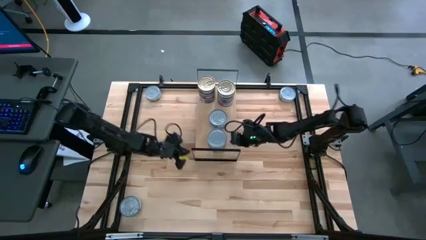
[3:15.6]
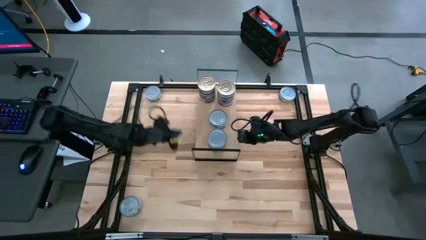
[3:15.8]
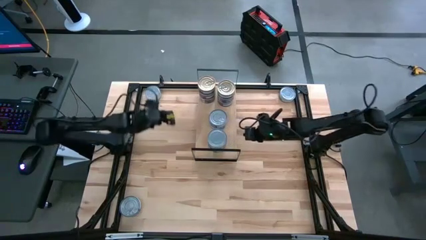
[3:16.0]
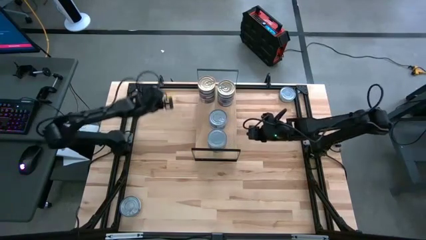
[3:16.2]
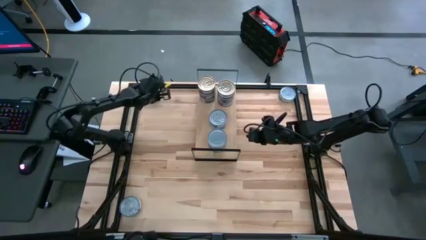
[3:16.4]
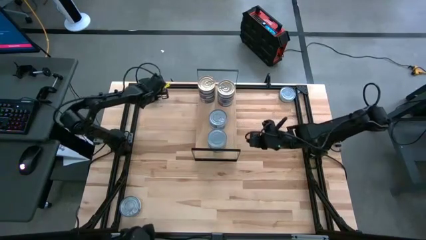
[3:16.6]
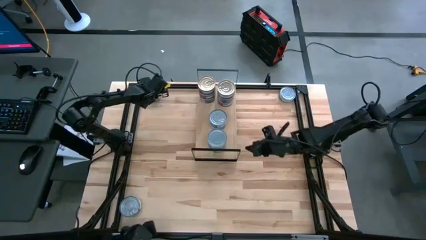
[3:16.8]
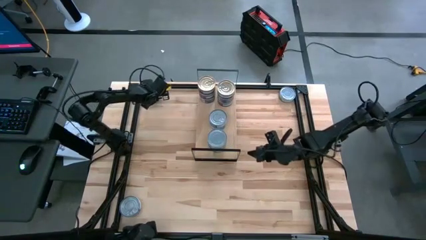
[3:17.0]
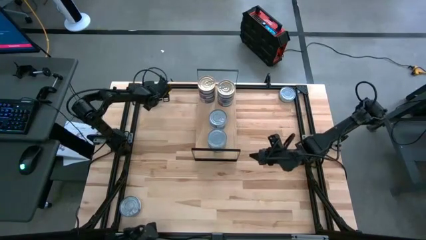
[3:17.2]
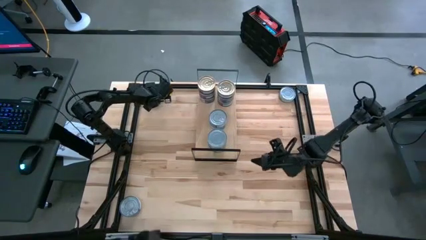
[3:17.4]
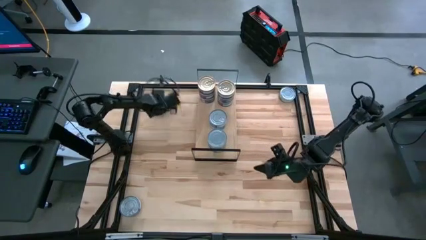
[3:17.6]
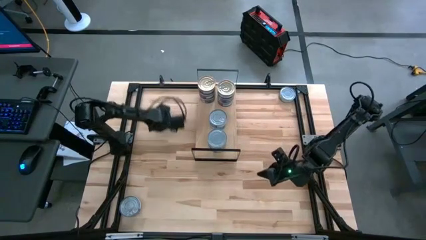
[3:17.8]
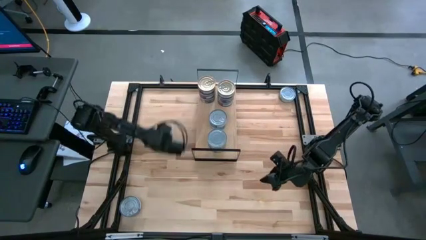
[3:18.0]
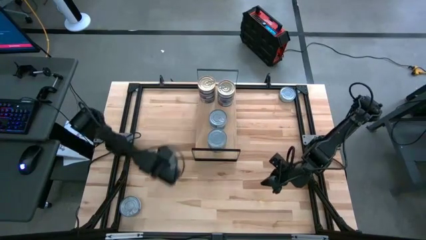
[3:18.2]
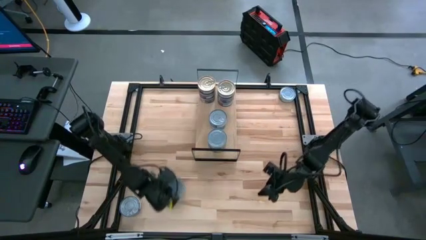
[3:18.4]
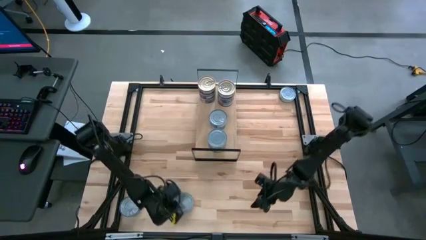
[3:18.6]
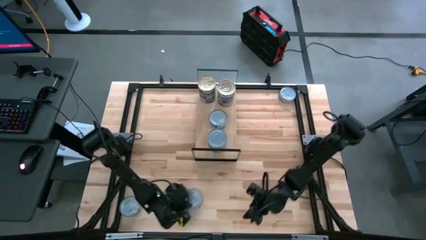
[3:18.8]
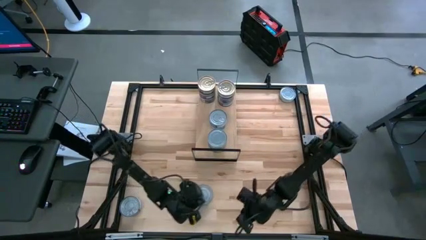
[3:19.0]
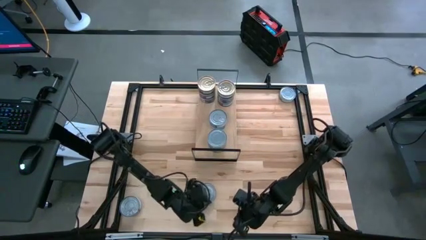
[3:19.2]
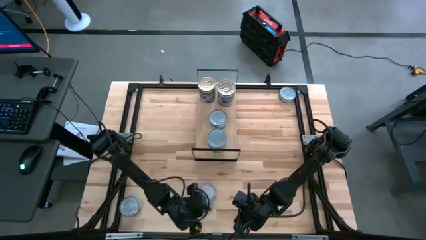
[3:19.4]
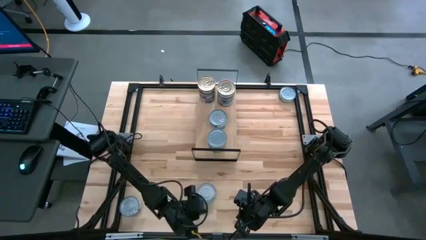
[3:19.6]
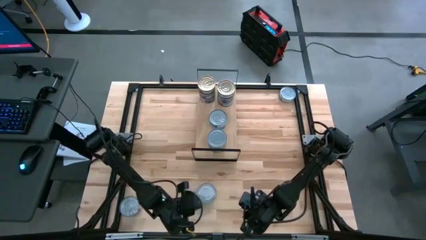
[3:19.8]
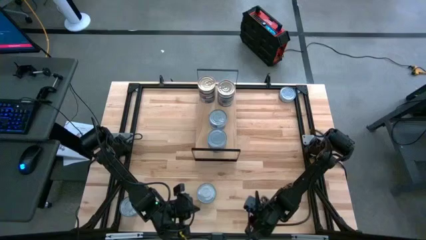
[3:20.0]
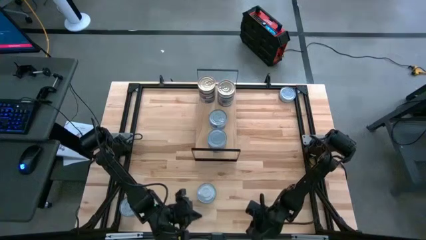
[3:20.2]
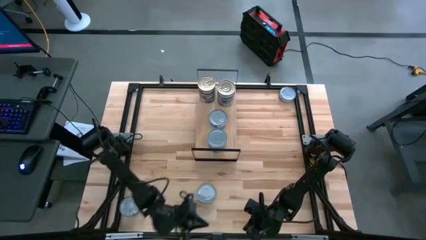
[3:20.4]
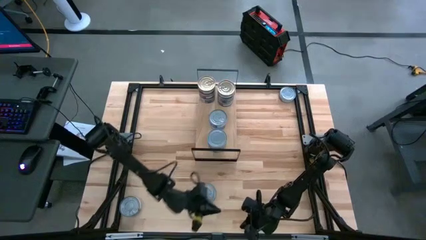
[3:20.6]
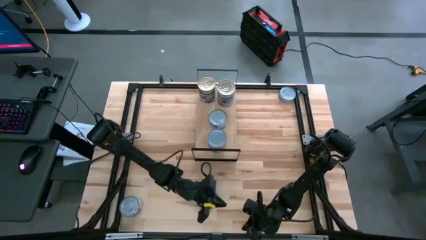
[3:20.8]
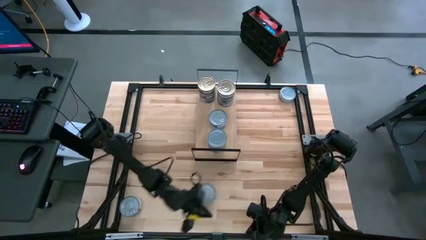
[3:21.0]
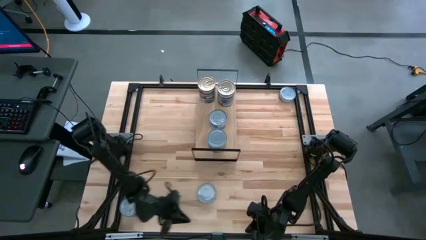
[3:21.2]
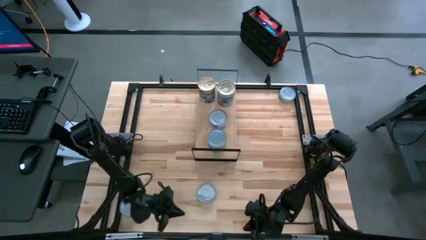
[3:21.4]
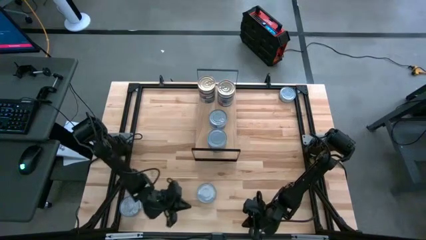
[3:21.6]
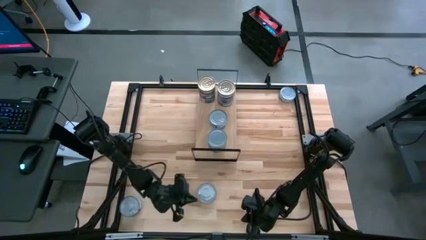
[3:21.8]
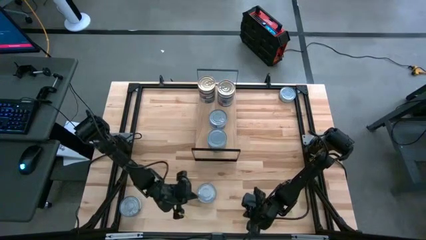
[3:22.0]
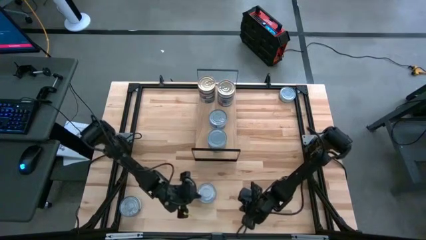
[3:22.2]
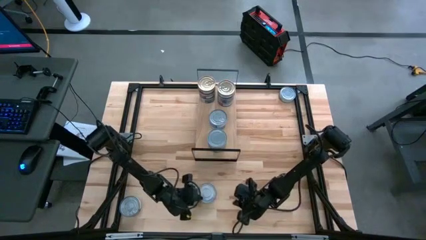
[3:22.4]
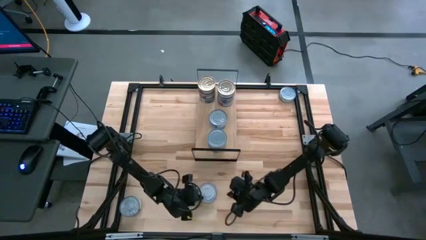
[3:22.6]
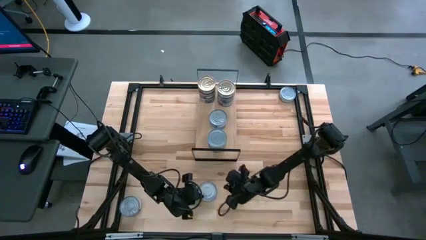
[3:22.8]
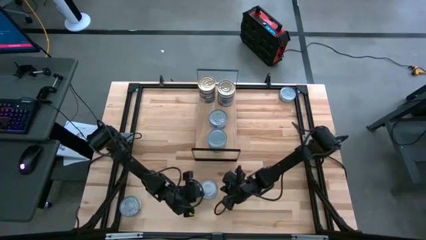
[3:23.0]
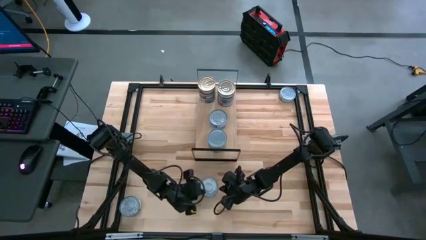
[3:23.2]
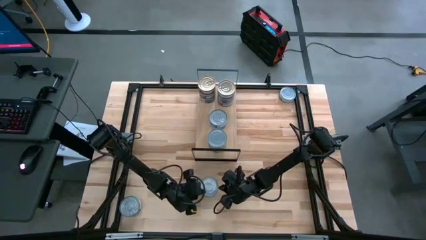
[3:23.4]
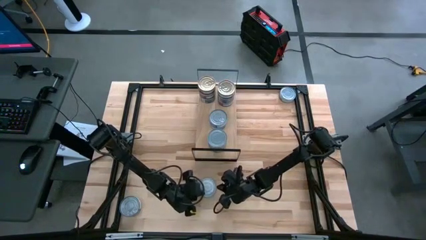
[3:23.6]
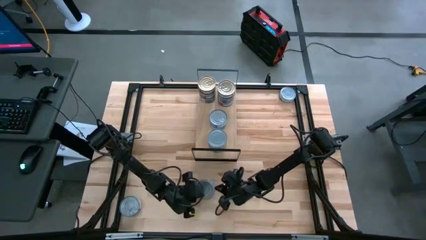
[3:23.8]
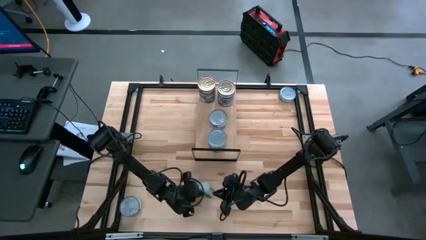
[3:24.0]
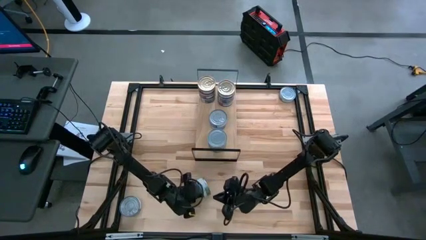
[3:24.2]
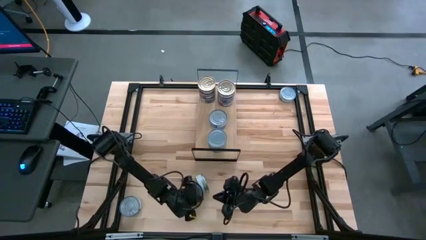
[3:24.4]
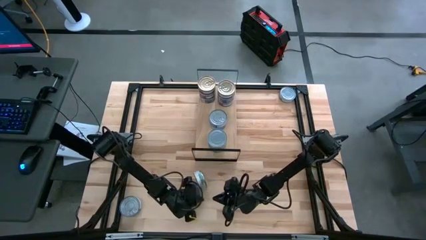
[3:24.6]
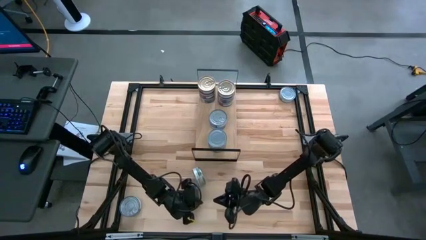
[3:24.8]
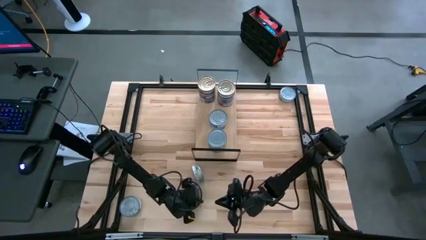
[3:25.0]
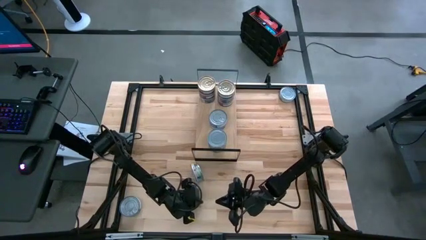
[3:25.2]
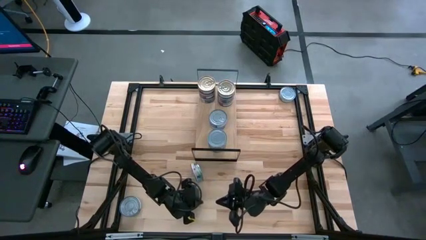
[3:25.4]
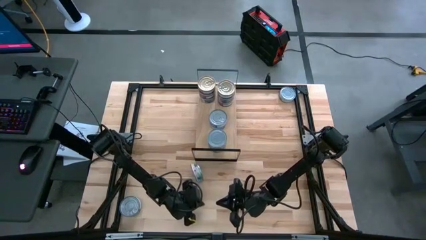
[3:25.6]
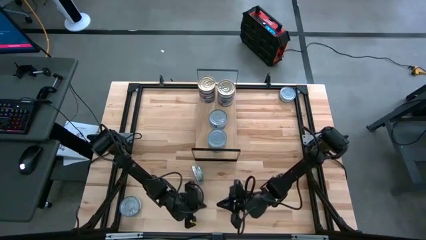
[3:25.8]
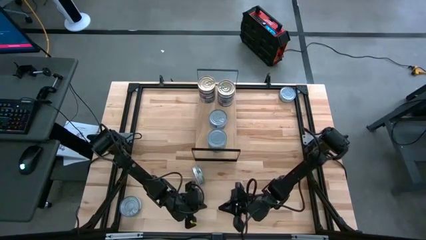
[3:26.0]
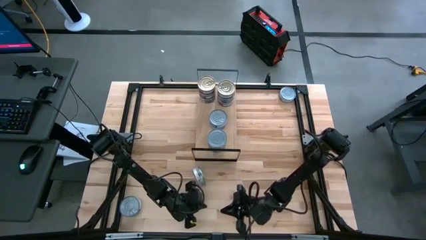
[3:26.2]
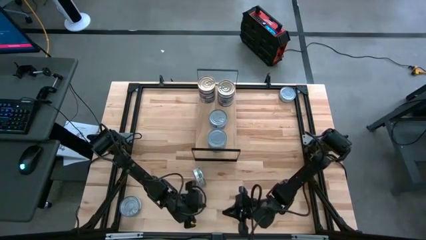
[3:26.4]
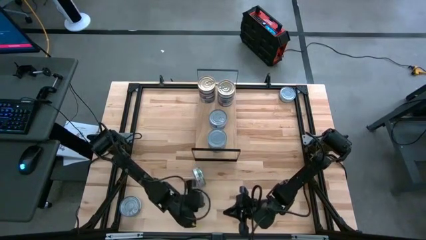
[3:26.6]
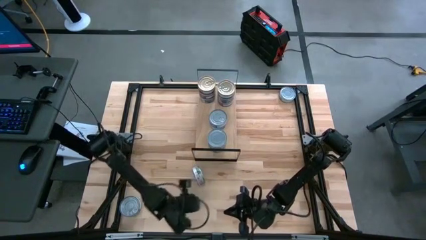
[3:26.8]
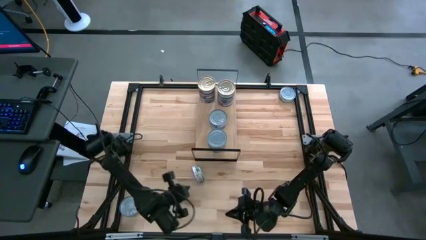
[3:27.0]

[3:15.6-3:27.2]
Task: Stack canned seafood by type on shelf
Stack the green tuna can on top of the other green tuna cans on the shelf
